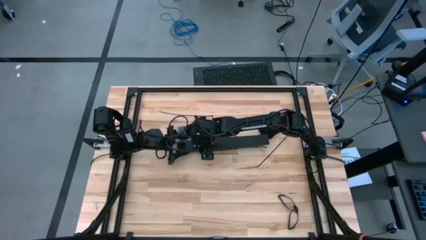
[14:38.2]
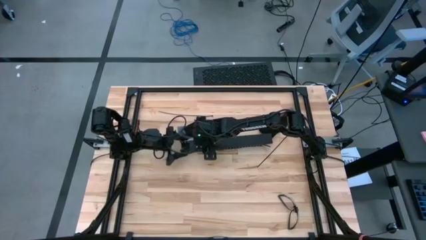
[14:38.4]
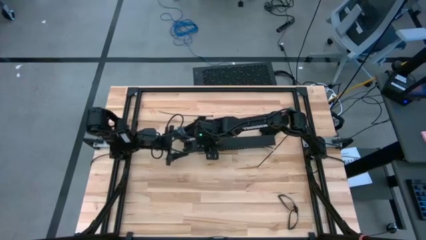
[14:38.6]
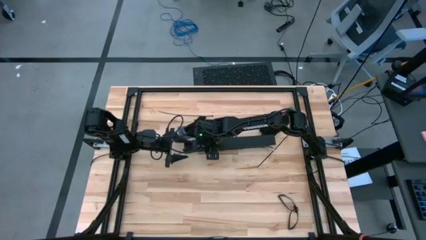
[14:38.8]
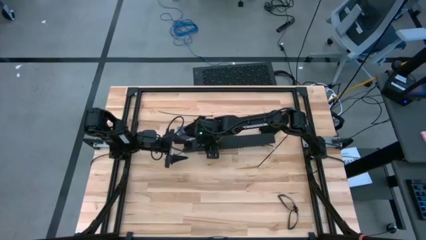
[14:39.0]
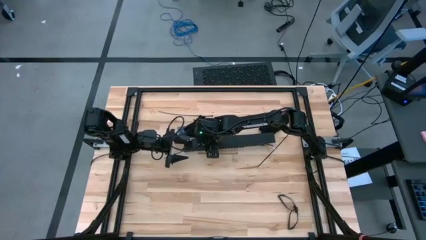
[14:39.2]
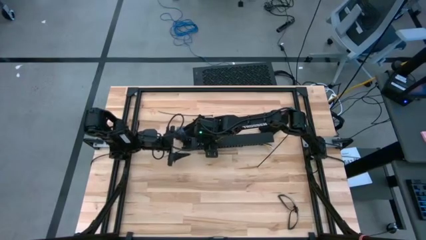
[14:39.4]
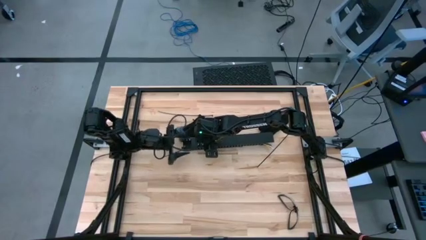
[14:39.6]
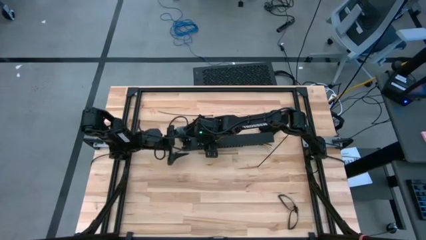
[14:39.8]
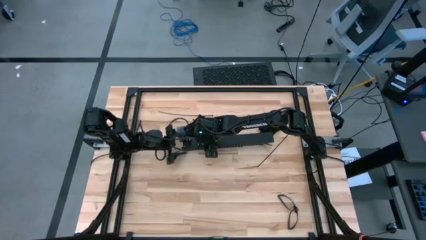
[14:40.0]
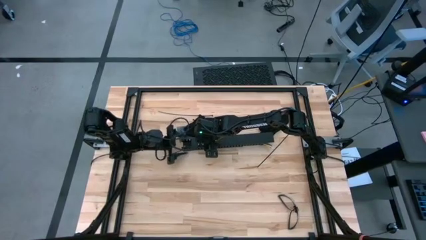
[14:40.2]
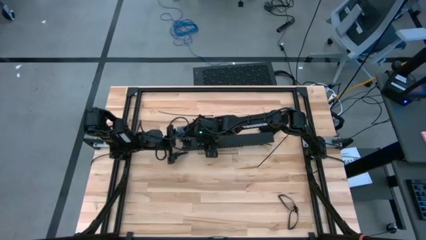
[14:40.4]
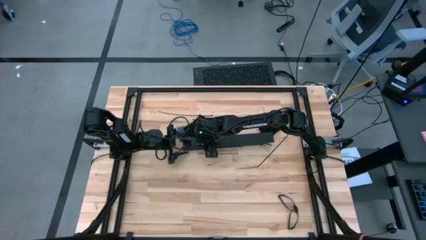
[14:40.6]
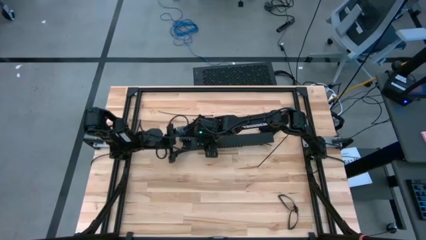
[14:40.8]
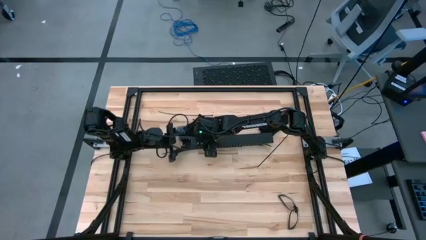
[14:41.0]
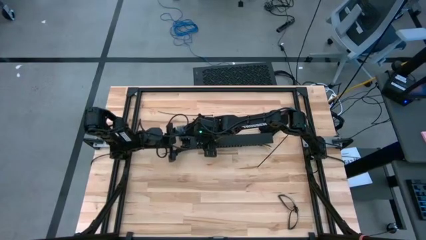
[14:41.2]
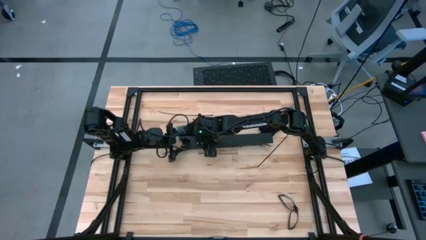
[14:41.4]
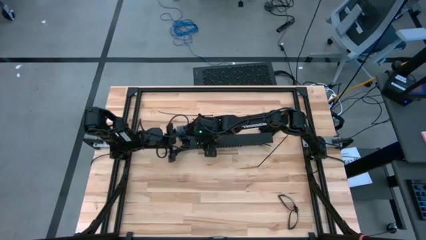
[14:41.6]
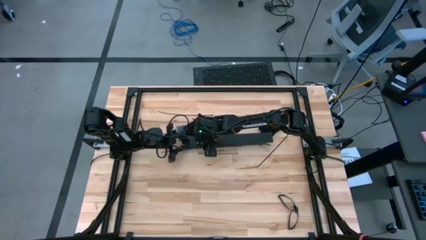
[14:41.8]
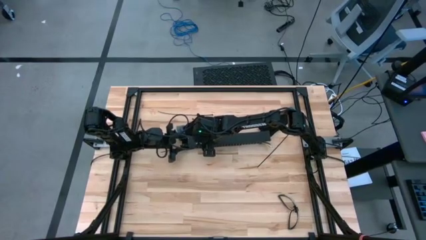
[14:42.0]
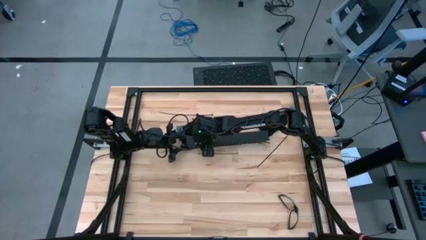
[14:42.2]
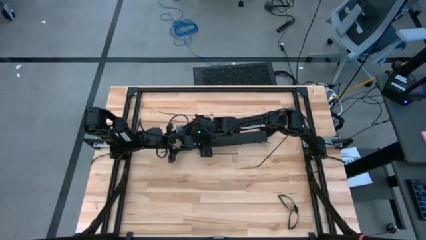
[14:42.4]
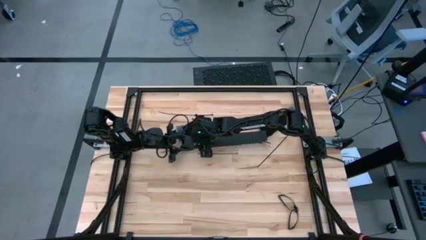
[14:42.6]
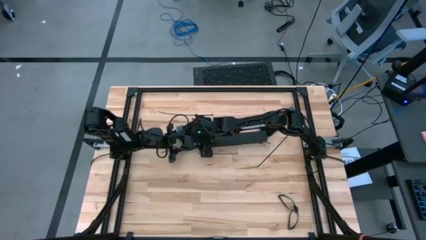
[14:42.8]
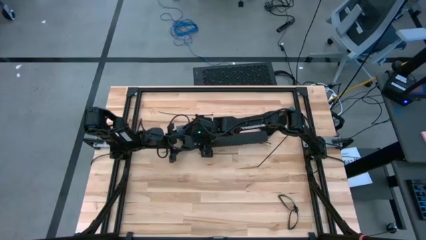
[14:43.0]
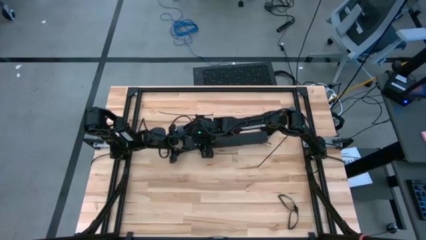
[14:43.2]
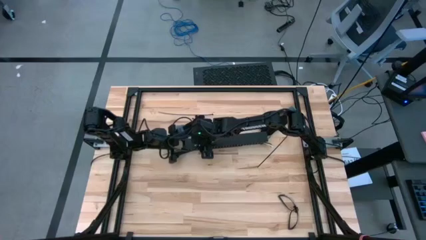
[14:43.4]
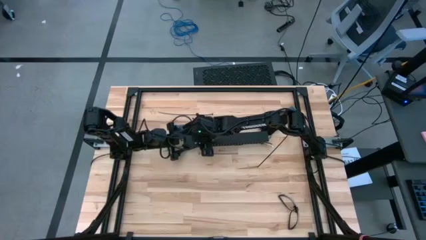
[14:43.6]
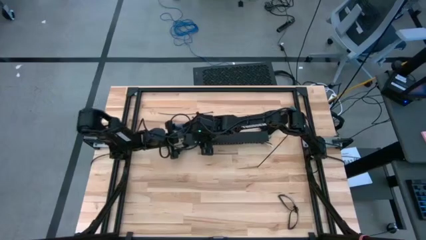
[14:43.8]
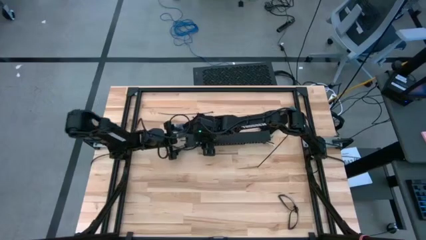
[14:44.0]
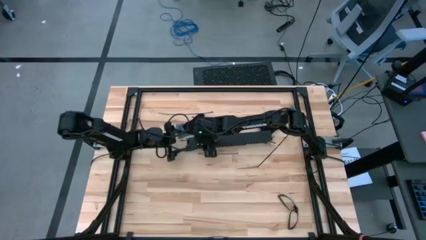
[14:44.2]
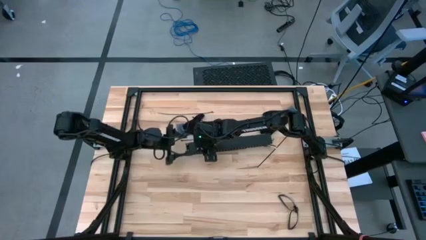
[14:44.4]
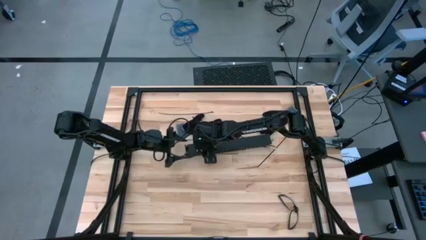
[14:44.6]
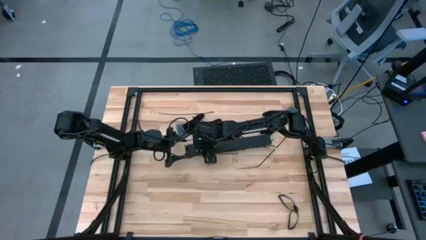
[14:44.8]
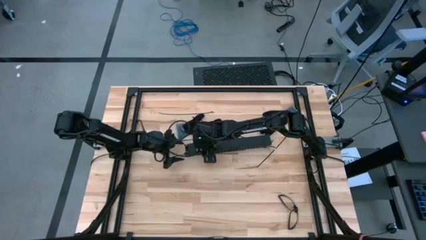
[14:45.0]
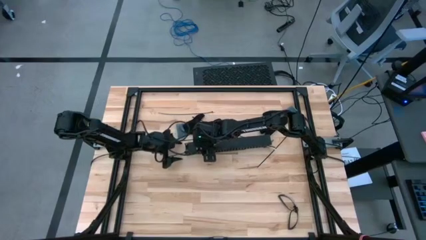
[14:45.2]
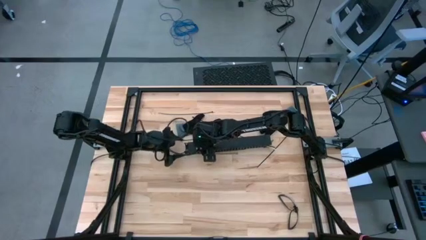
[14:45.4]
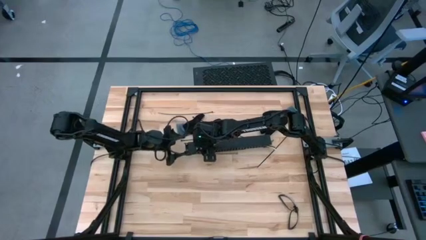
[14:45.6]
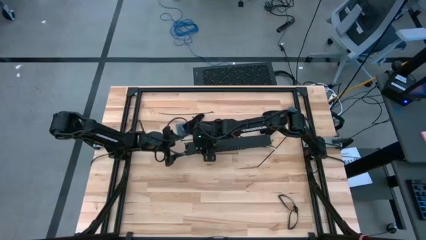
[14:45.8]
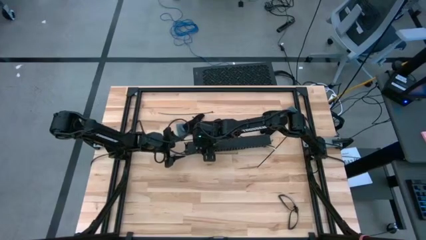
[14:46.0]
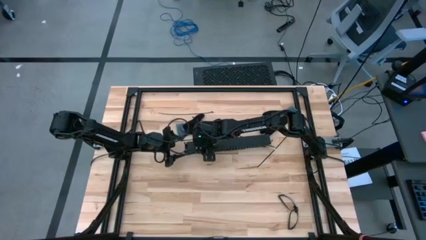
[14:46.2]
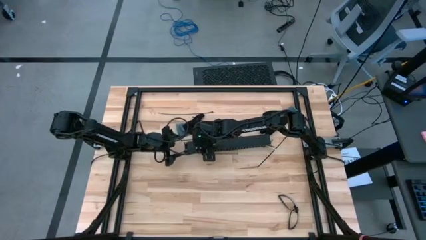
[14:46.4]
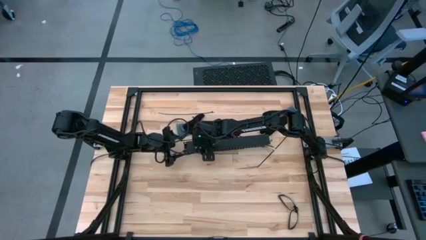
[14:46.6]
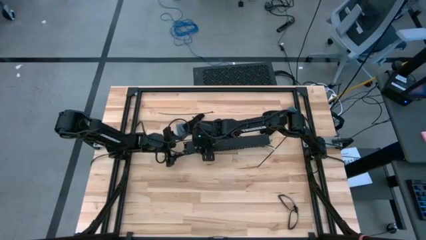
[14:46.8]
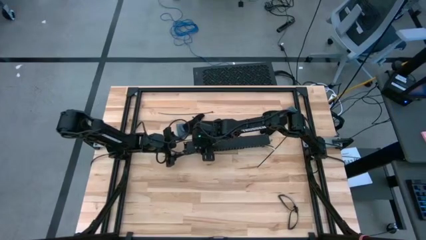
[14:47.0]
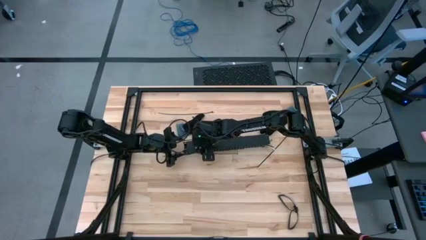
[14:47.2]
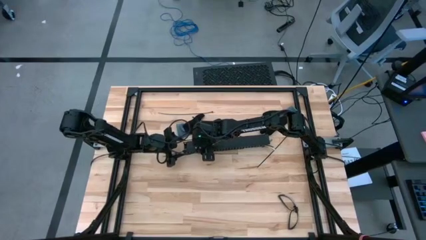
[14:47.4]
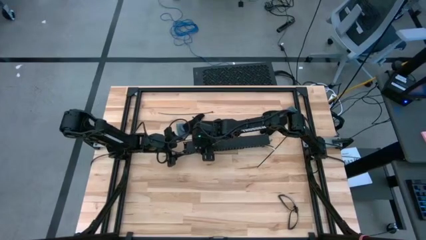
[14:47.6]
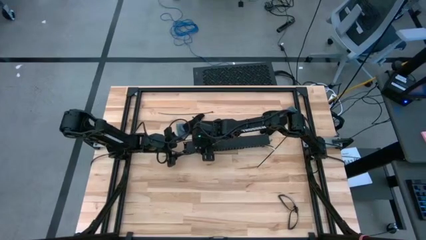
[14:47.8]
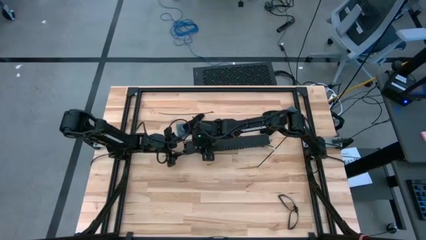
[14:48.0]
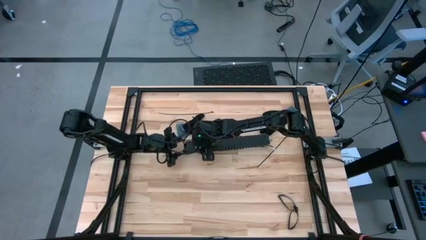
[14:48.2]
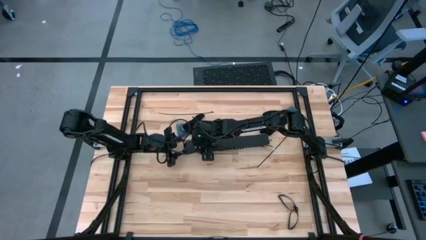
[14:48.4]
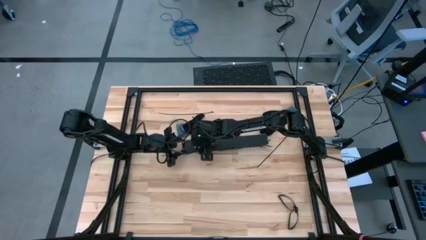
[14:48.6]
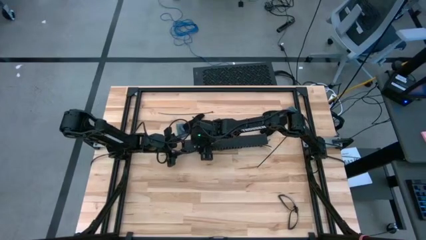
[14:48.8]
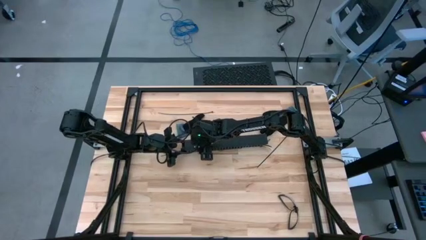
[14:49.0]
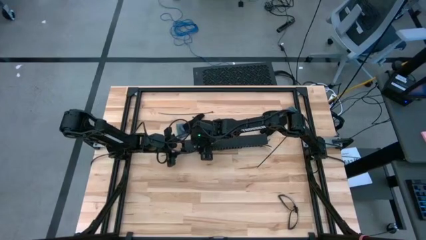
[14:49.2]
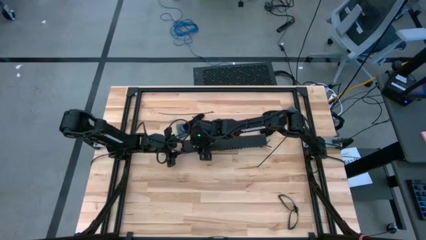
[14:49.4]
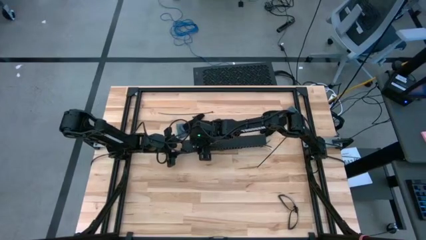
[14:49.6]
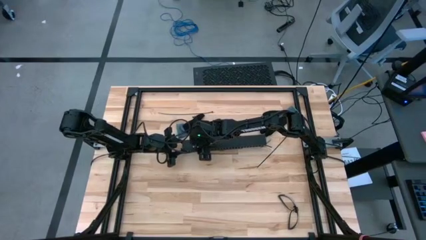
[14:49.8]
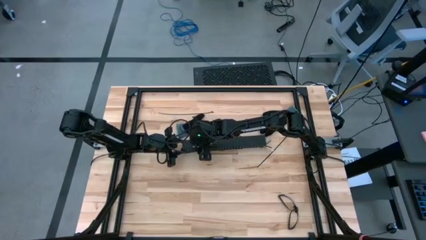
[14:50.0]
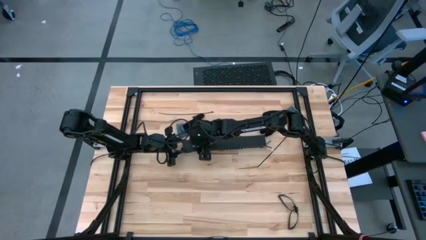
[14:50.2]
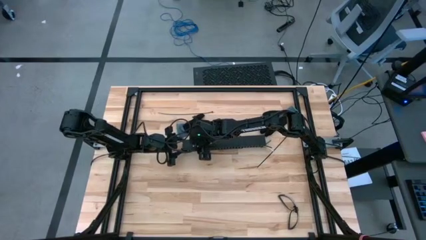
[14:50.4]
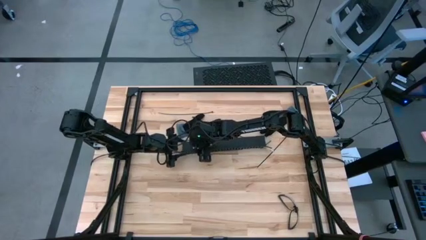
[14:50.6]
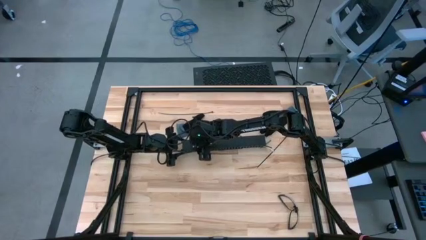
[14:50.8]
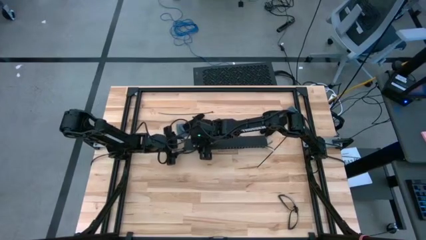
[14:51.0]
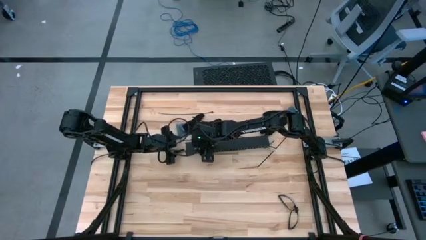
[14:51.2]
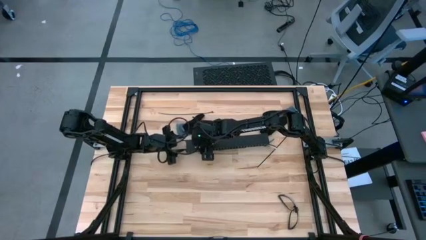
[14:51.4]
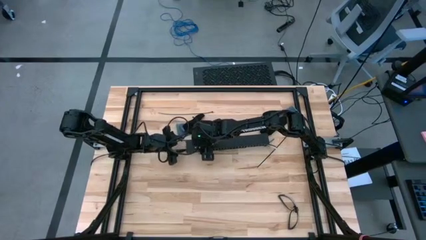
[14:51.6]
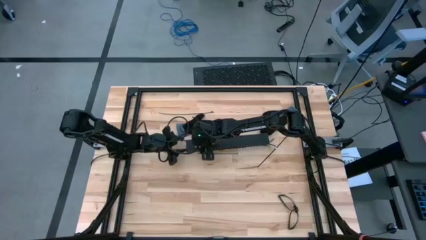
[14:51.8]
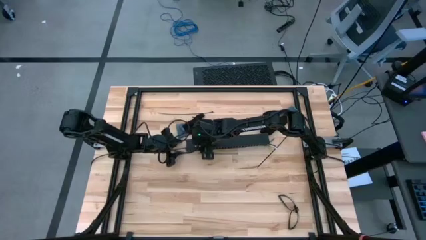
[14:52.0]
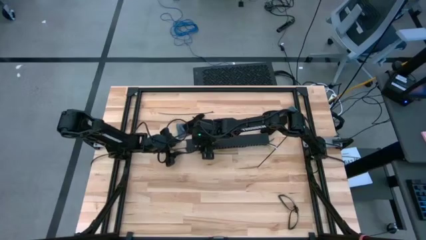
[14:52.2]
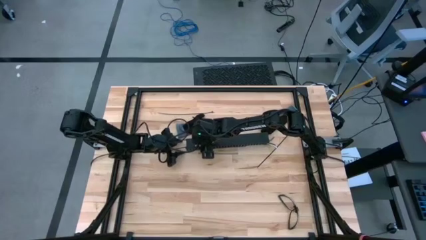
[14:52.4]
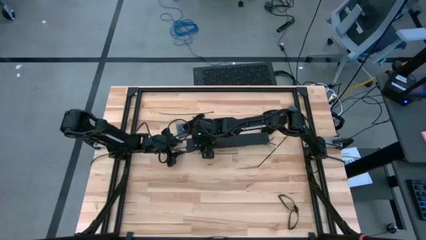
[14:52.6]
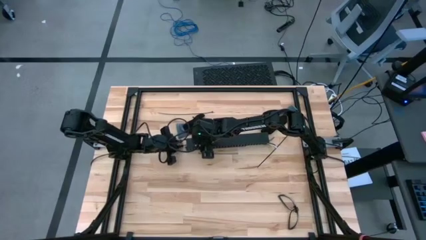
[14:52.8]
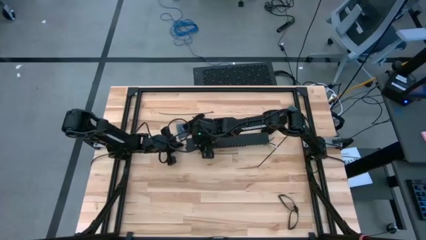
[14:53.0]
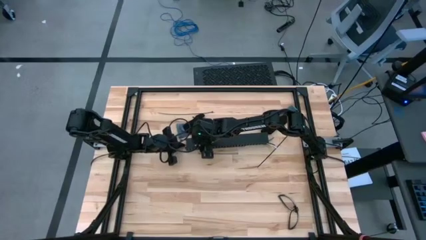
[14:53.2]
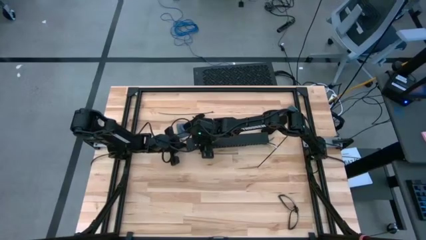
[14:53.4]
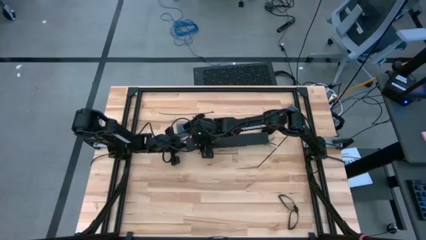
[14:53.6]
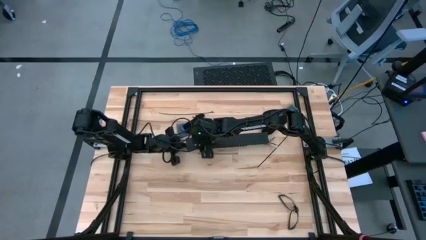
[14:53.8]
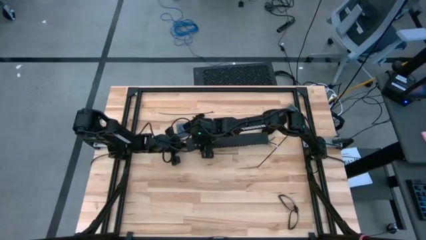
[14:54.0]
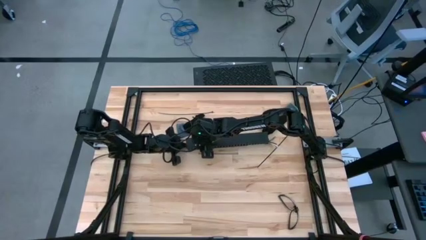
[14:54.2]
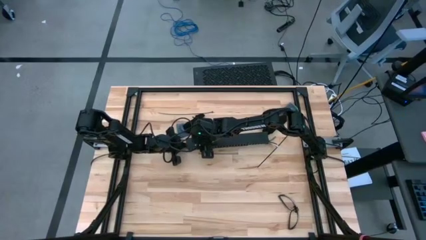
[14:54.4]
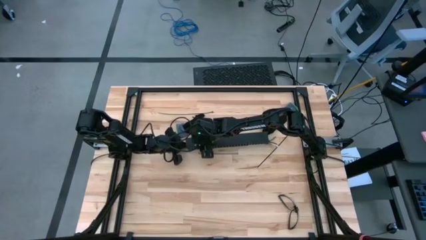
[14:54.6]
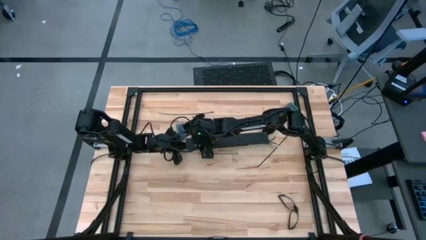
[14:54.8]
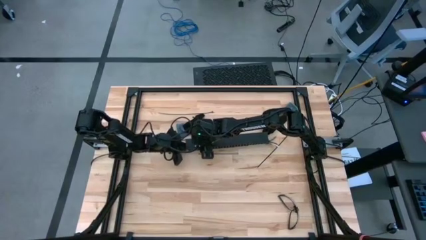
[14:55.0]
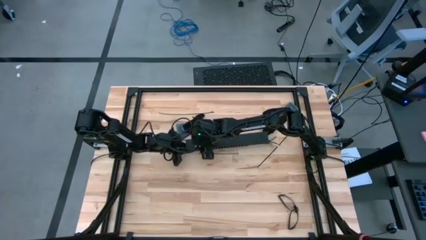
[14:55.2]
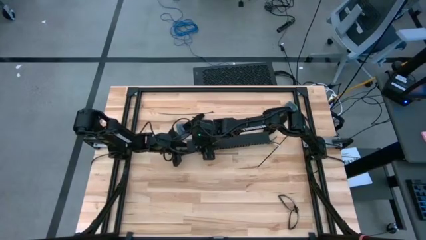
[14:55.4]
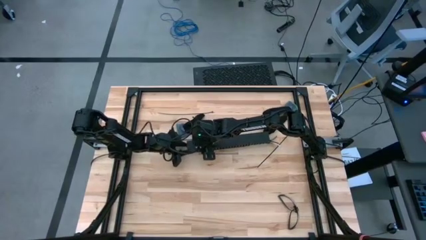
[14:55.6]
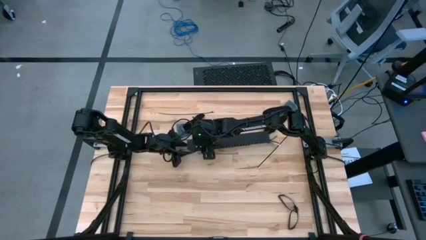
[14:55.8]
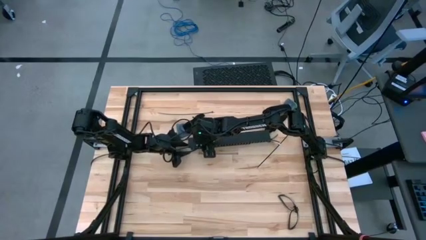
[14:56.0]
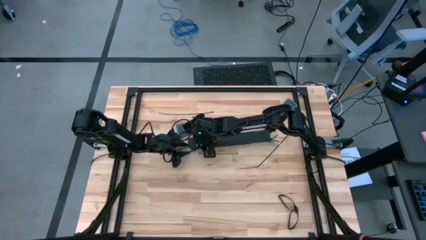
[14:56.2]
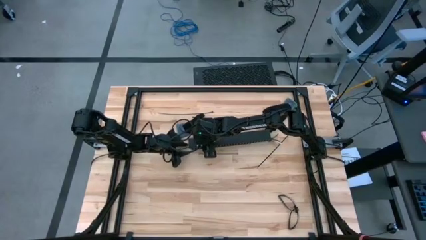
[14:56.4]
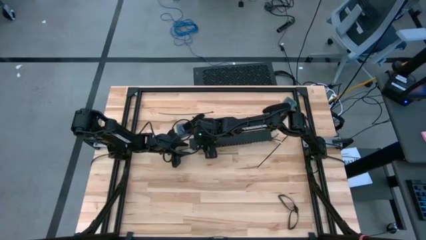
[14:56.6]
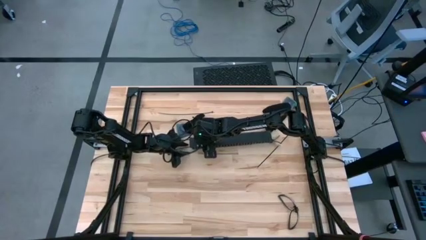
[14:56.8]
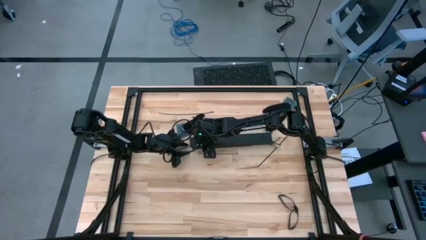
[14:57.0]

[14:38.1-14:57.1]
Task: Ziptie cables
Close the cable duct
